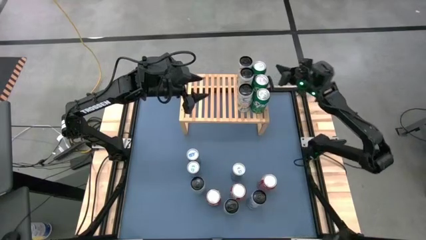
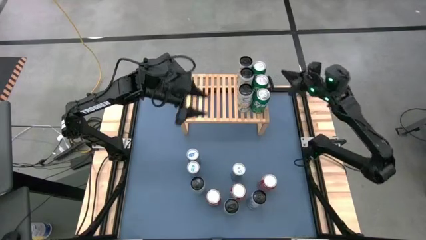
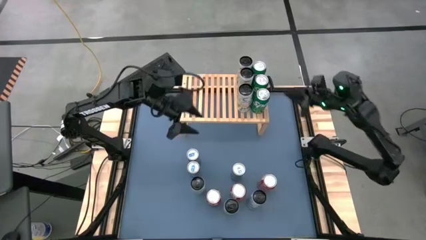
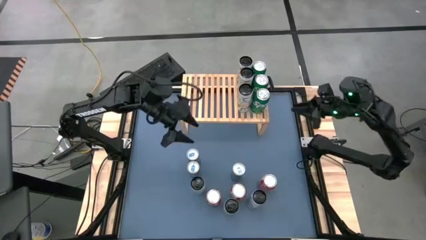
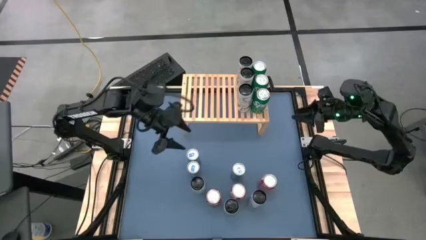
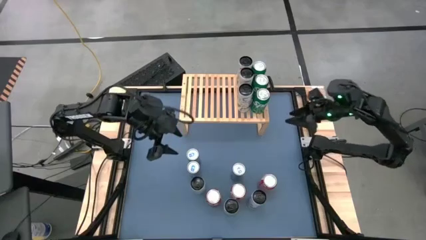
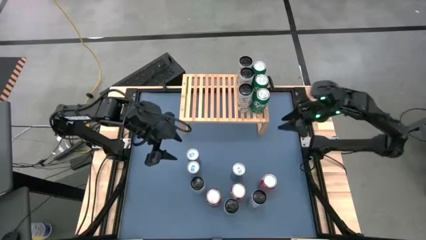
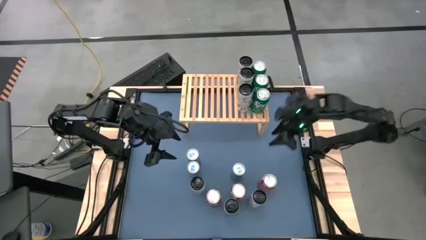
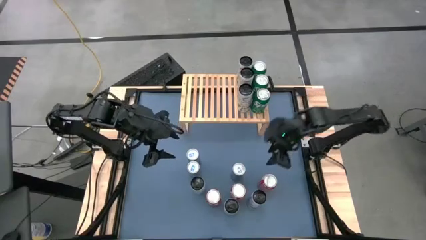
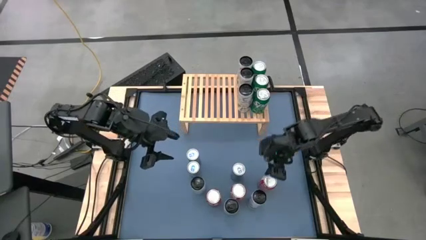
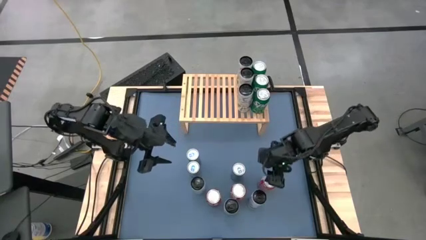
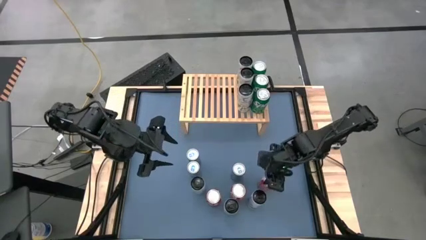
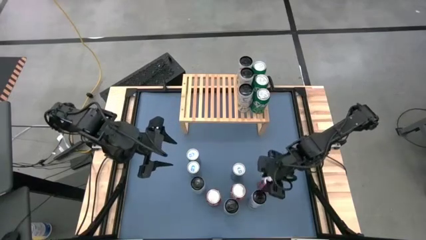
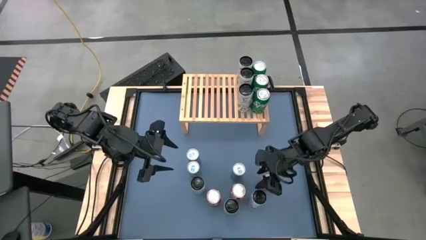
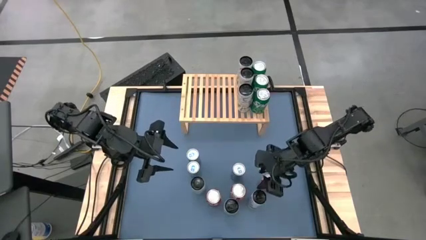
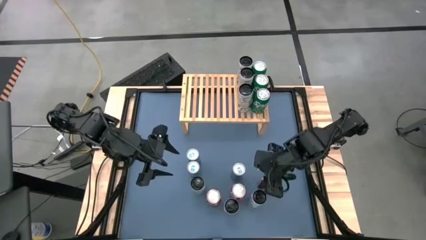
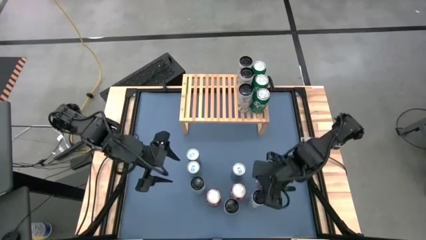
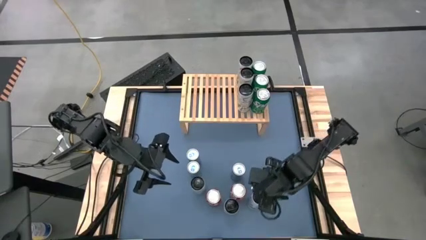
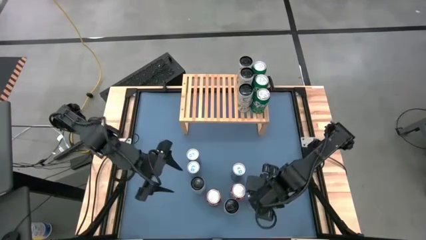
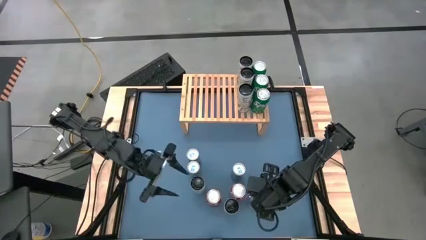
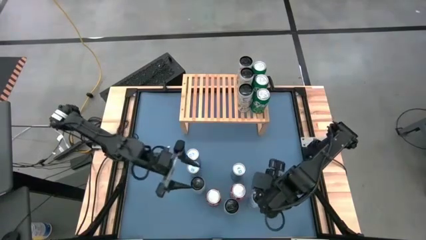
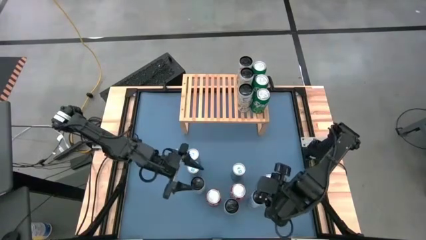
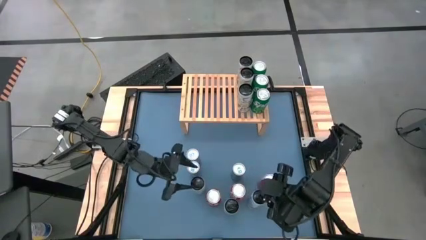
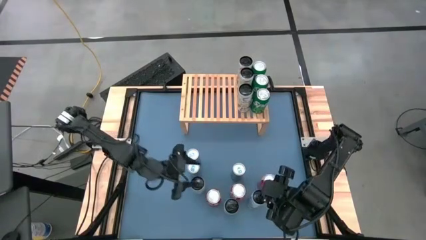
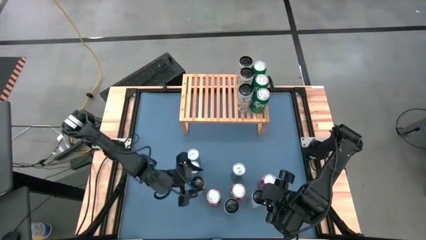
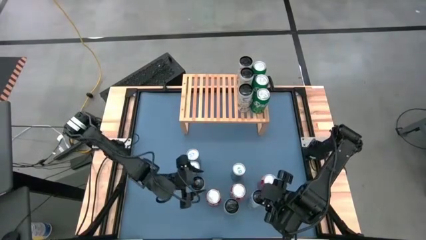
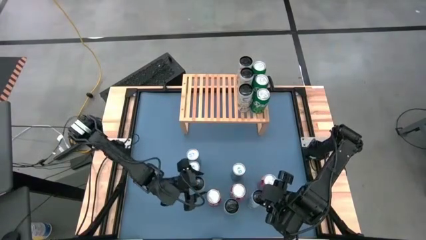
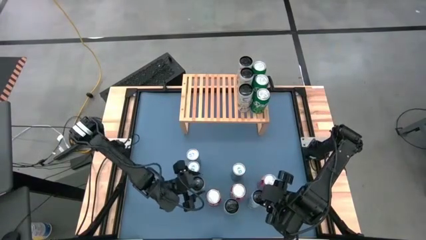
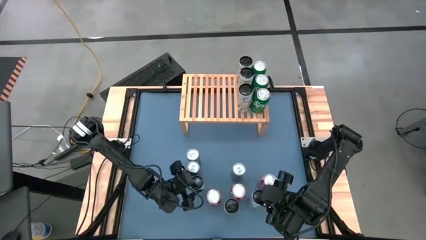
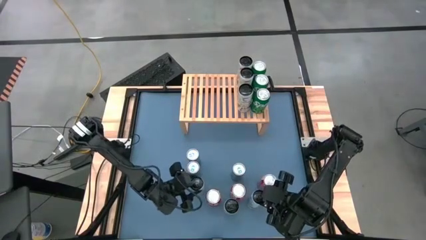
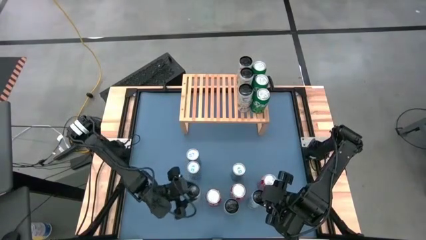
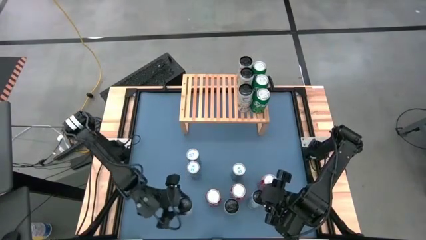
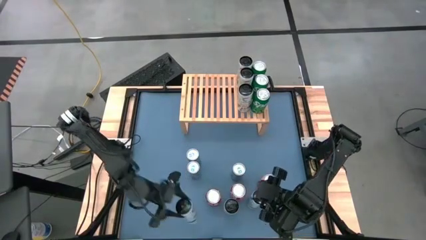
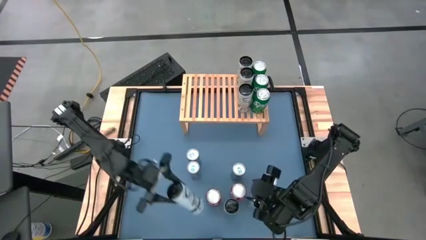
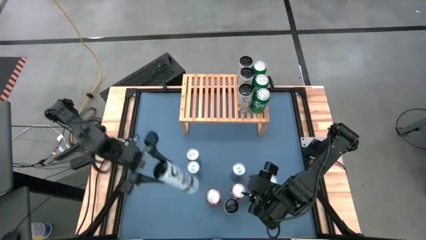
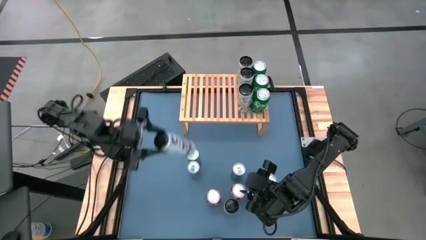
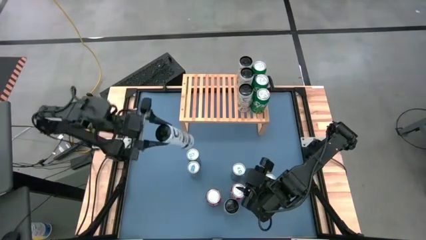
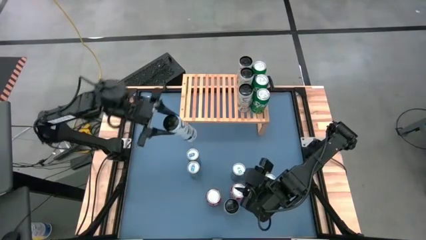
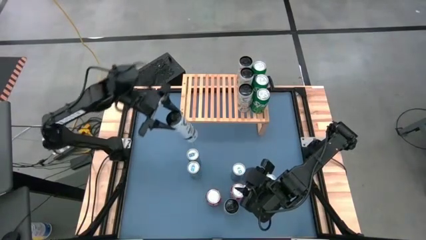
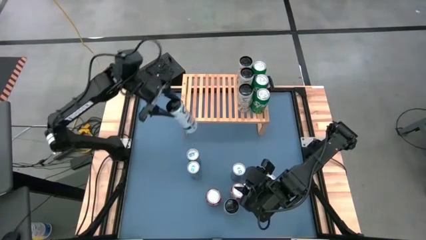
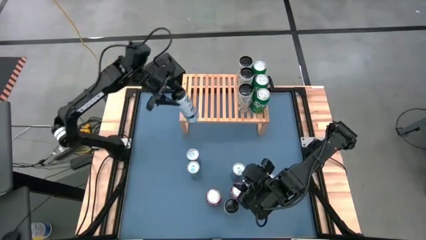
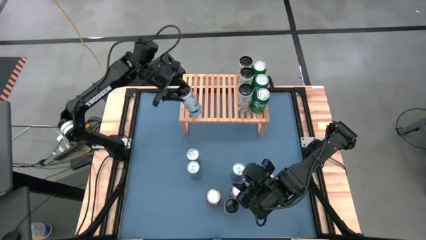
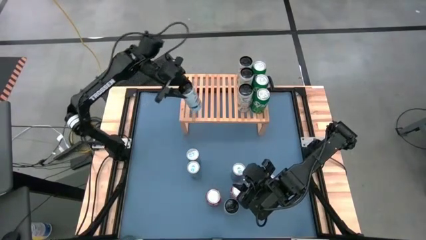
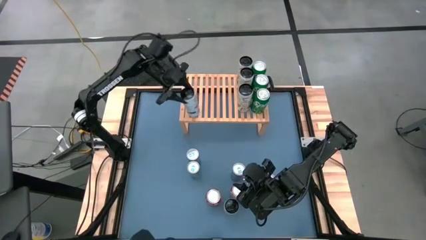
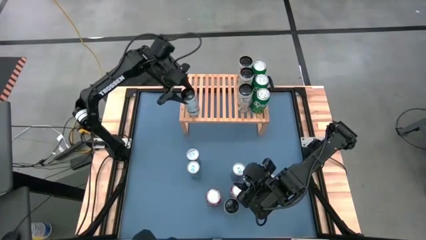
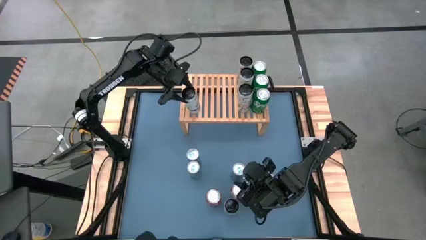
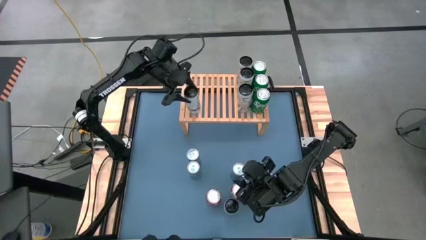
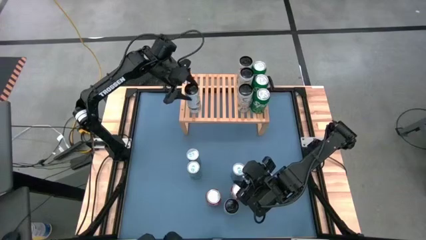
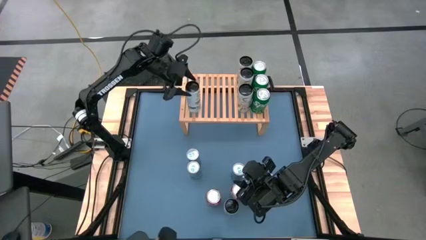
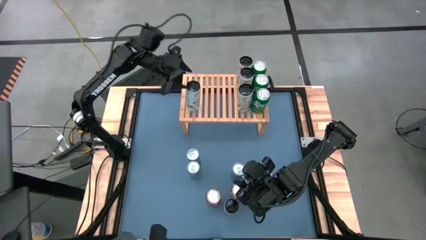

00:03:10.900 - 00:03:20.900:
Task: Place canned beverage on shelf
Put the left white-blue soda can on the shelf

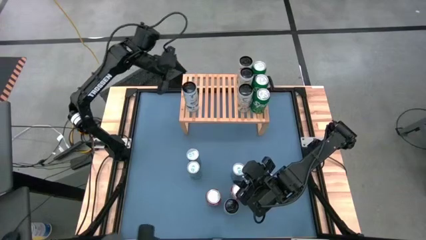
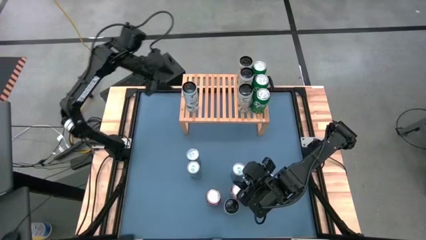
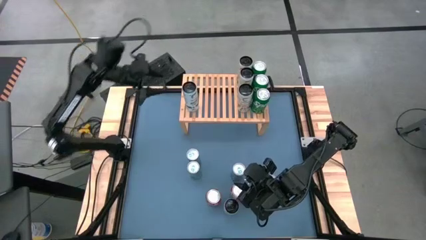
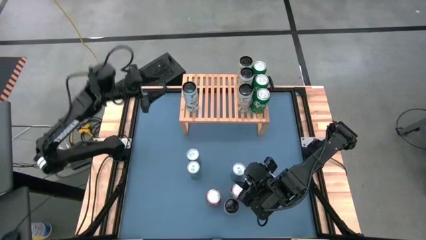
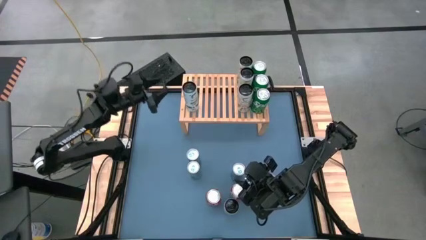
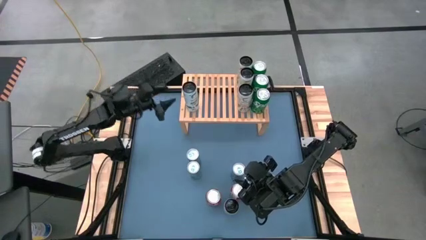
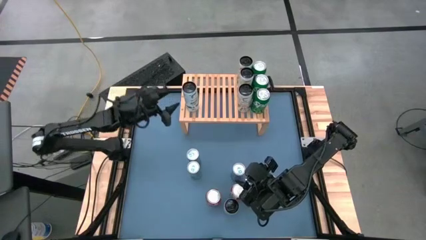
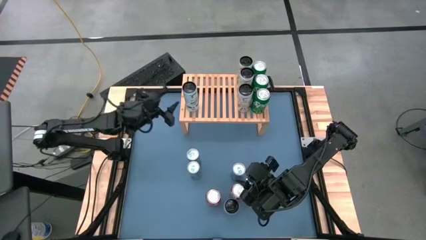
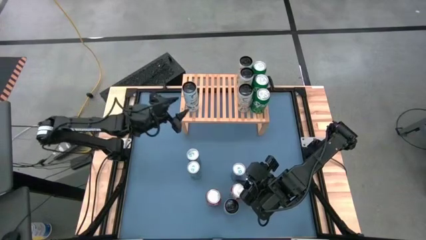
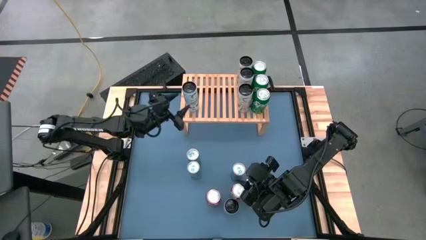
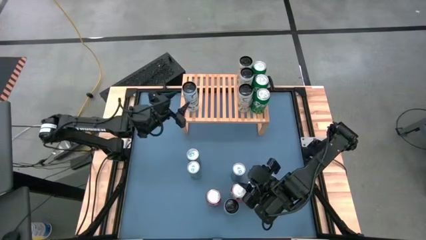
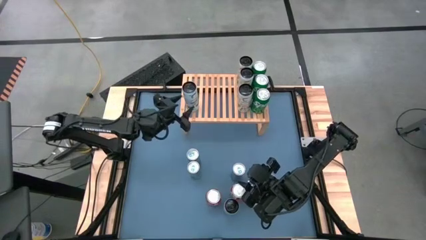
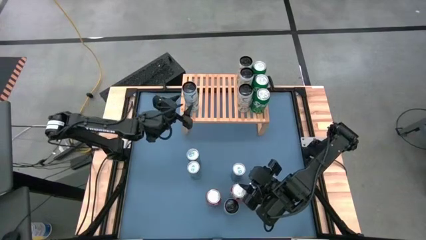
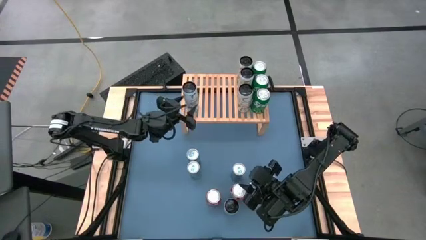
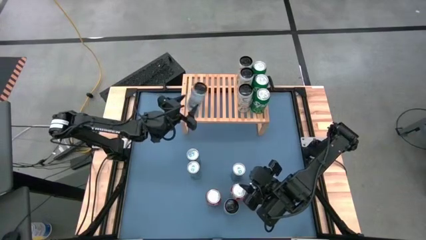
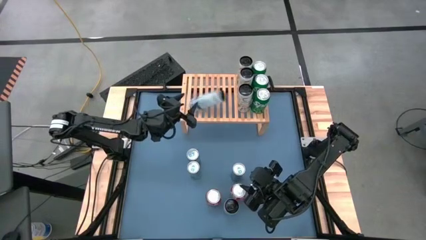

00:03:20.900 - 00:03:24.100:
Put the left white-blue soda can on the shelf
